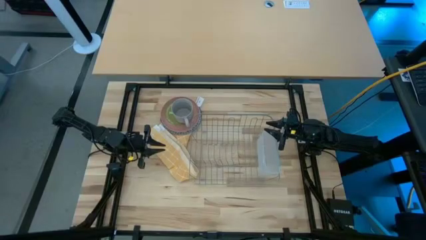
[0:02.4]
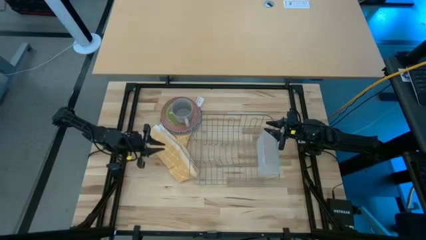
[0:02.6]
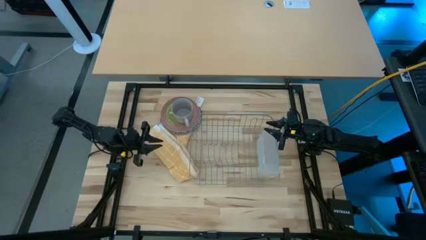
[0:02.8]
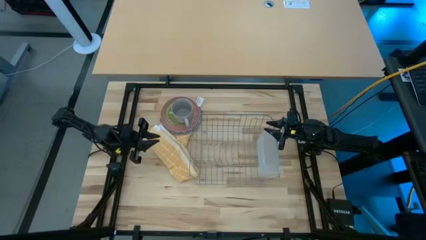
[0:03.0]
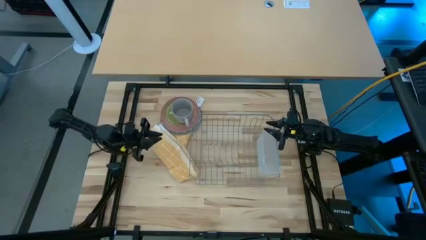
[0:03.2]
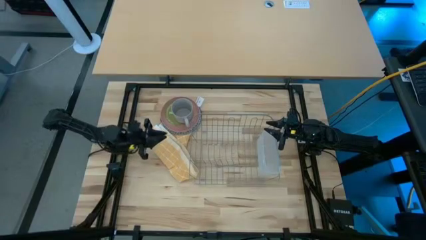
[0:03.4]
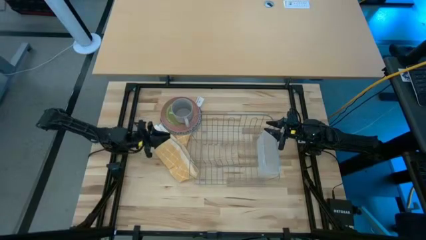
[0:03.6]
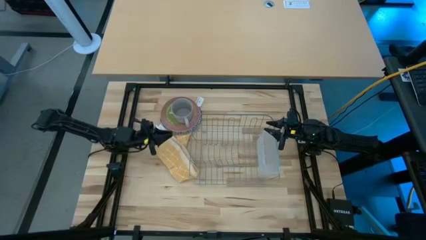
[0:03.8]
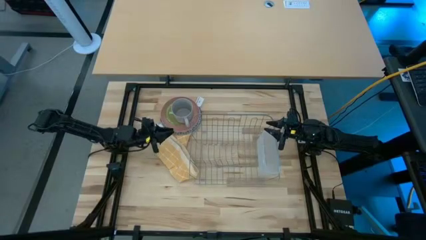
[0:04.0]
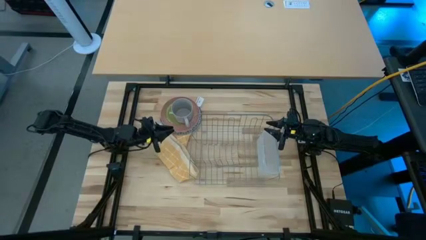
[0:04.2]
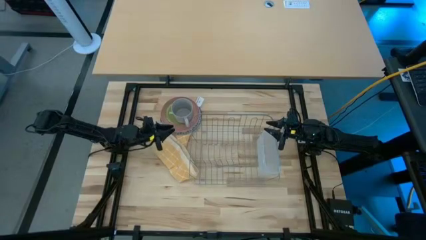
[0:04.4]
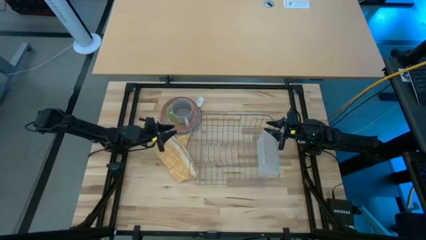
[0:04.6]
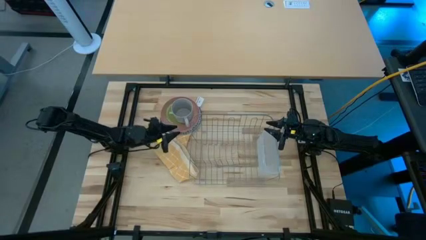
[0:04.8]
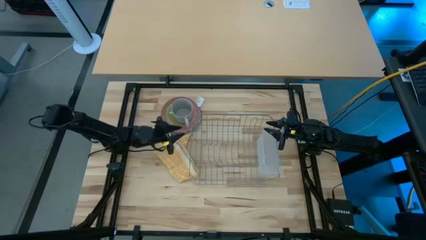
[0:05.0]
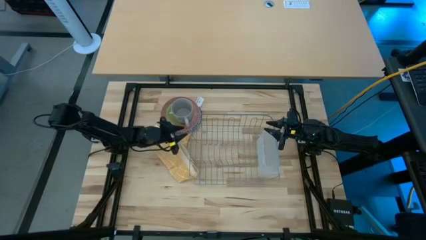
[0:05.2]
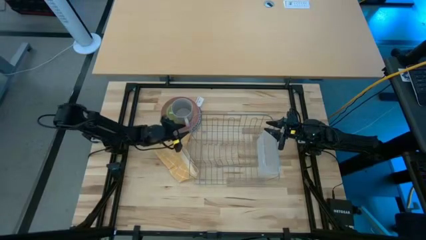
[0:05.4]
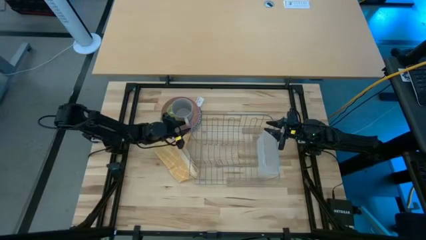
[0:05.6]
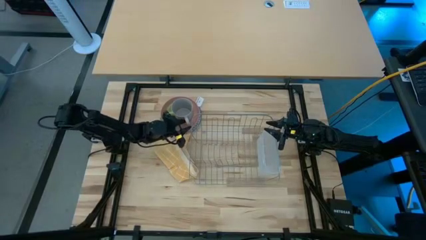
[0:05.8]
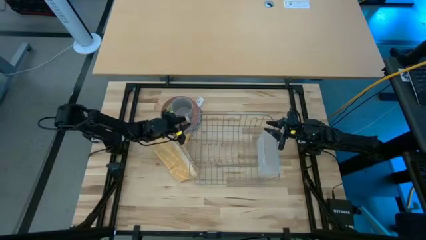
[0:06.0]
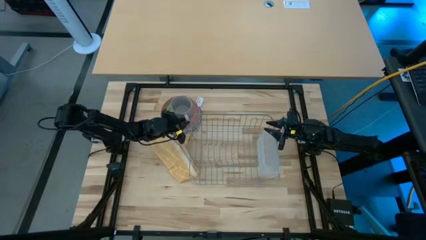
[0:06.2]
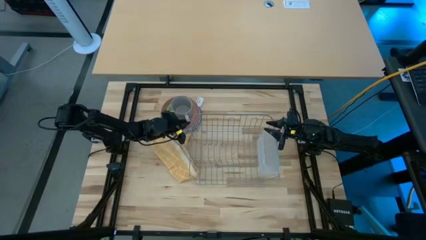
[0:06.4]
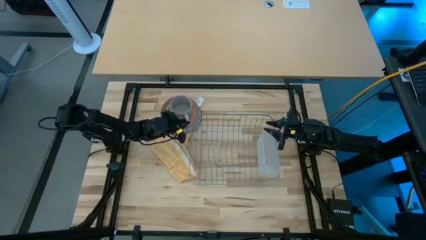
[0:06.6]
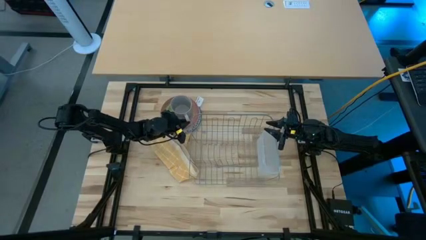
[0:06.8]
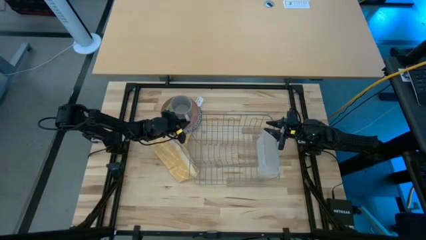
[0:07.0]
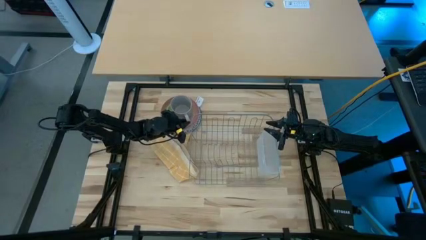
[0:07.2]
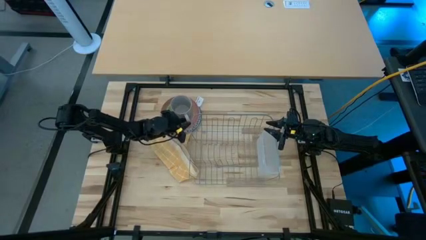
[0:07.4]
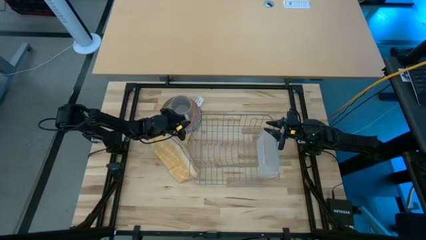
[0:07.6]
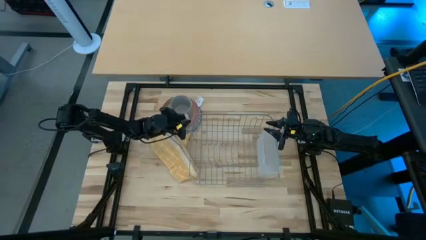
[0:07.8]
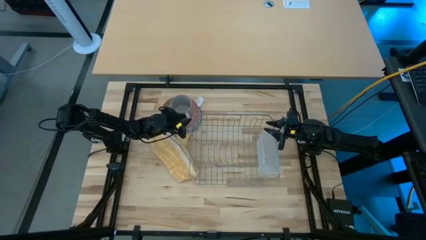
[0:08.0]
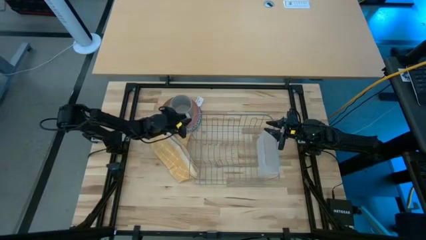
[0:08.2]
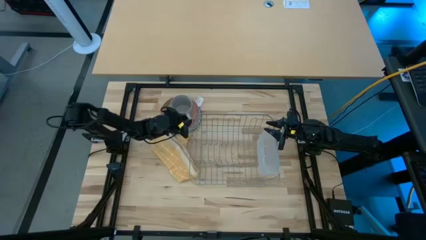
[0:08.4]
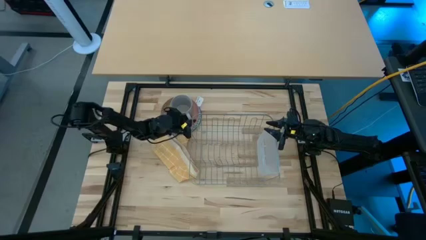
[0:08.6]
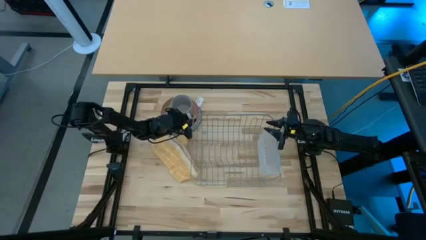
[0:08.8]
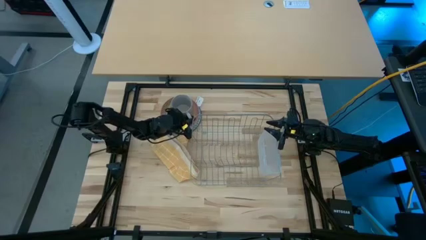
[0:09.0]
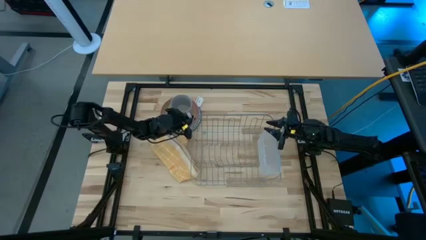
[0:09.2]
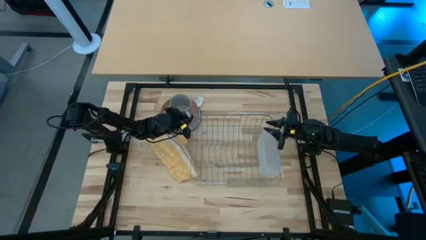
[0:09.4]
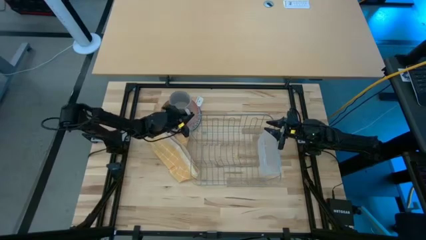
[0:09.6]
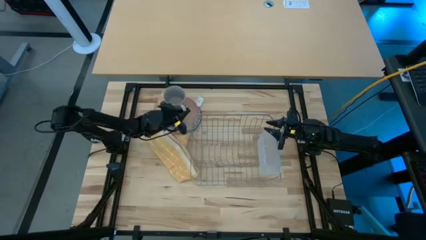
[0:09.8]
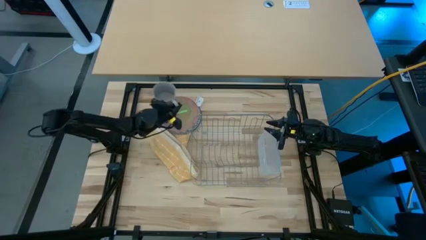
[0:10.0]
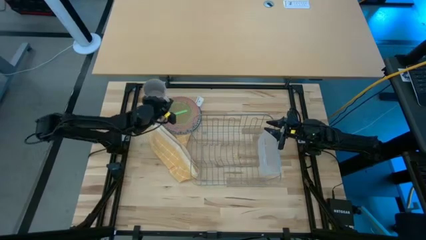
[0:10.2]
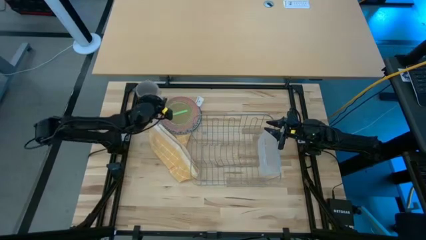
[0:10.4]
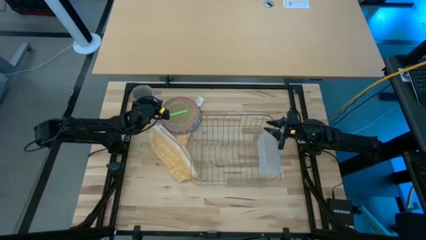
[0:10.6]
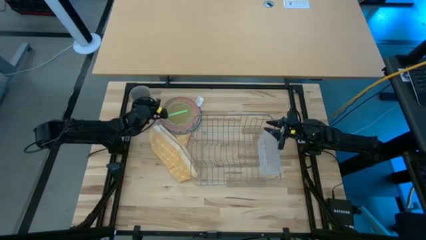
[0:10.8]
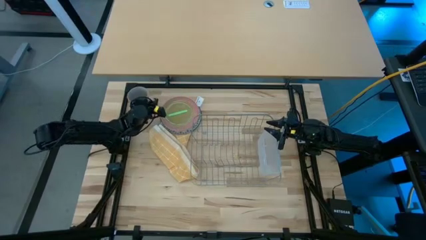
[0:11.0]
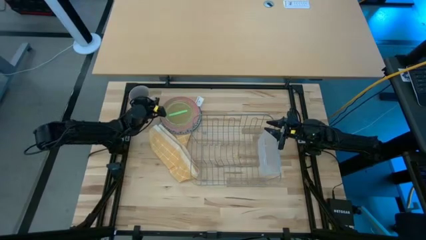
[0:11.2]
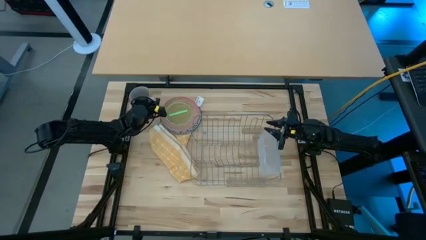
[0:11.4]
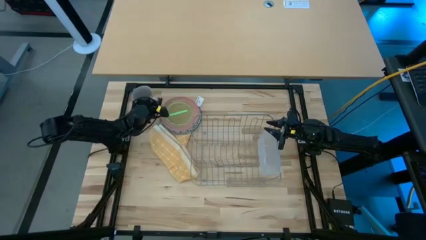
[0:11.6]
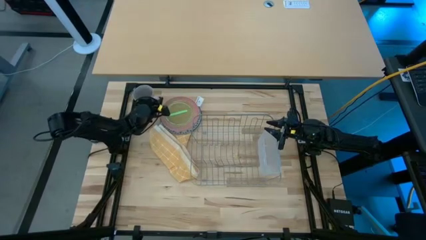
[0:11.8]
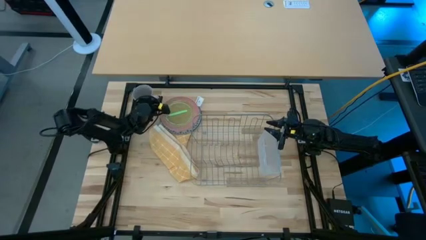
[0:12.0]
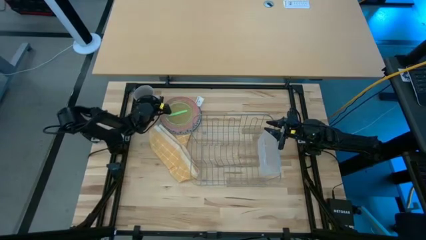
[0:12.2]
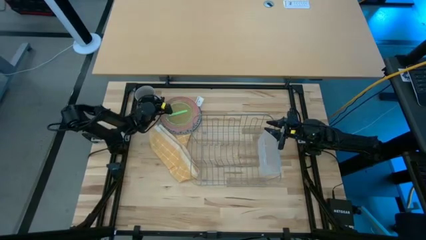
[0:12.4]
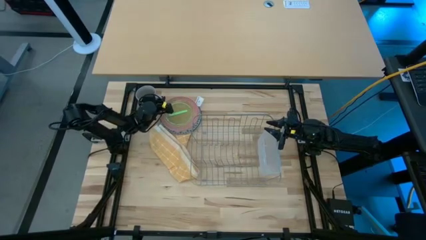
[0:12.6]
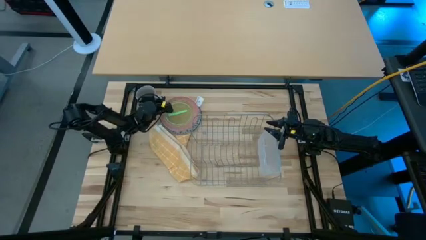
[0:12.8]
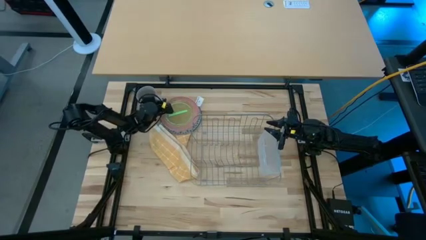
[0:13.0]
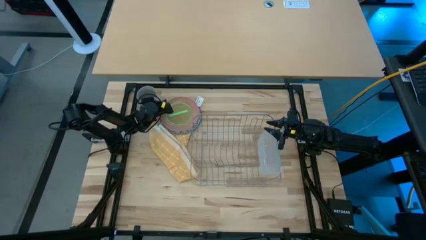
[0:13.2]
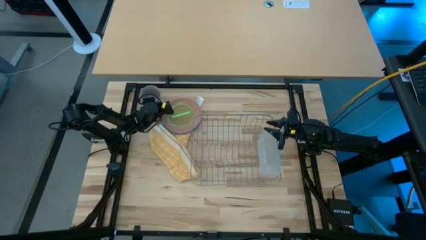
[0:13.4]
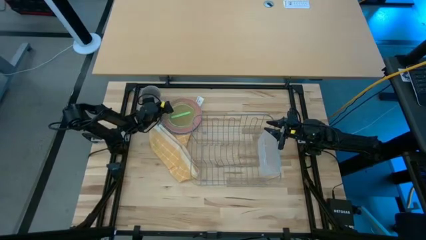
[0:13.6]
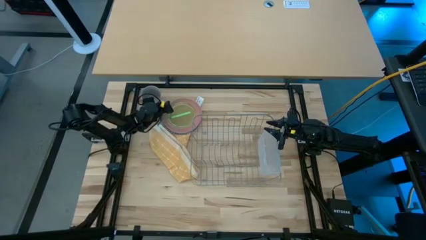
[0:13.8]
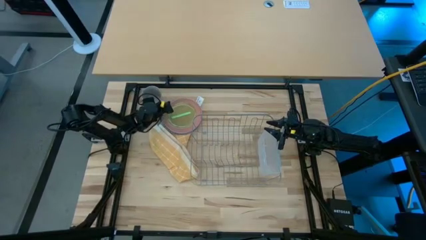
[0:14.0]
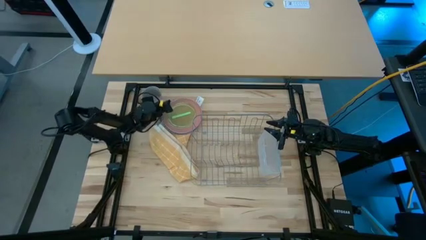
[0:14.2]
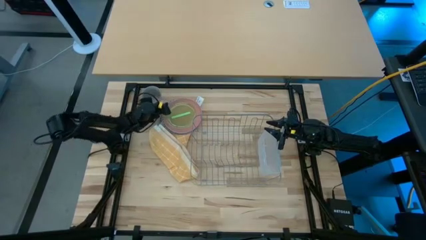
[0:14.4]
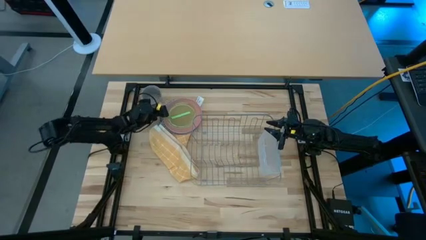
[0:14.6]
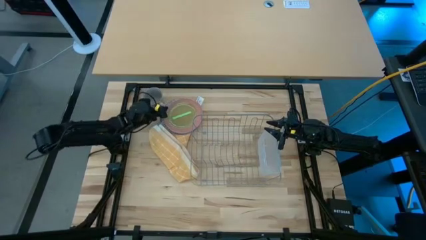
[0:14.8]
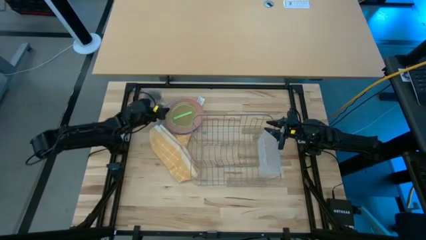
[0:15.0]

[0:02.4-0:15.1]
Task: Sort dishes
Remove the gray mug from the green plate
